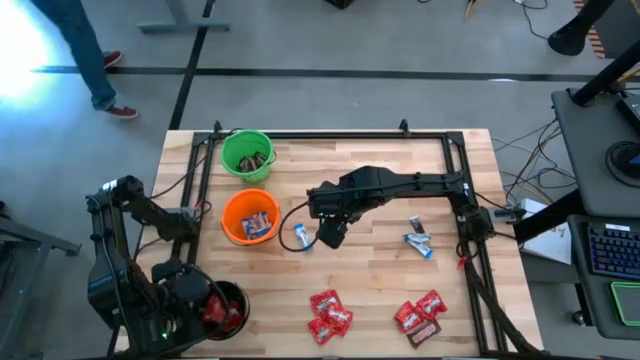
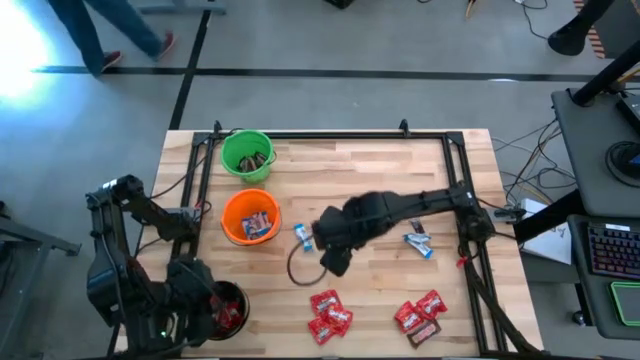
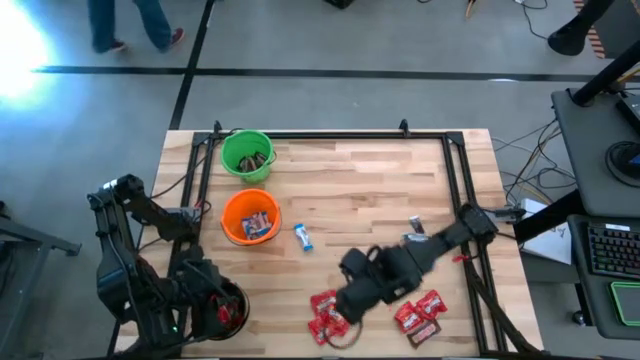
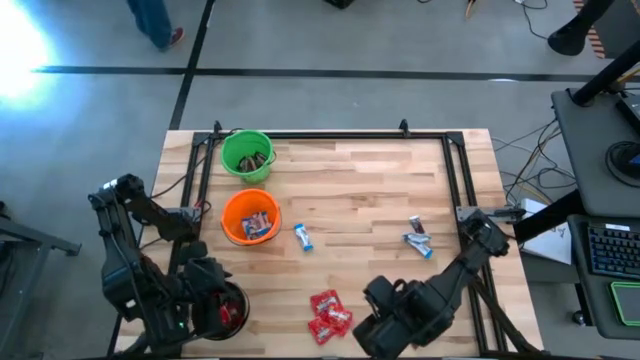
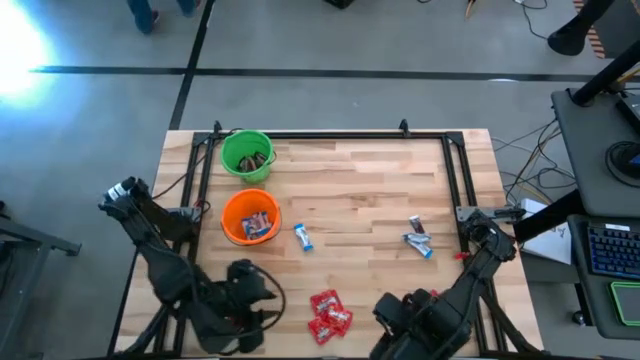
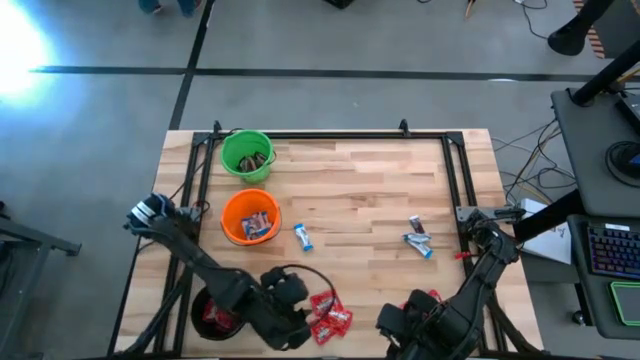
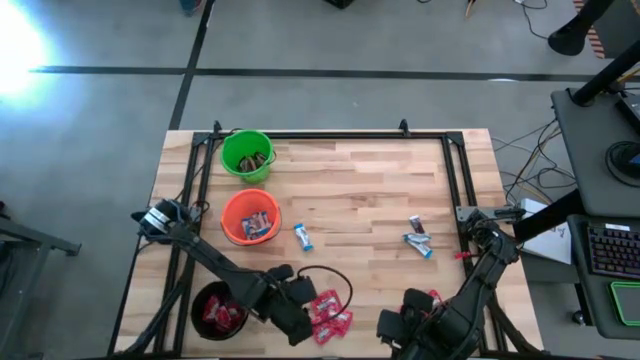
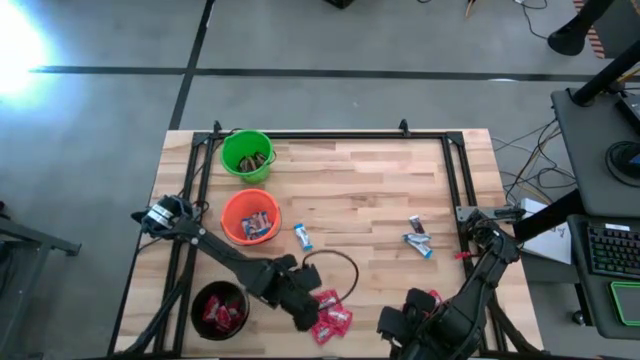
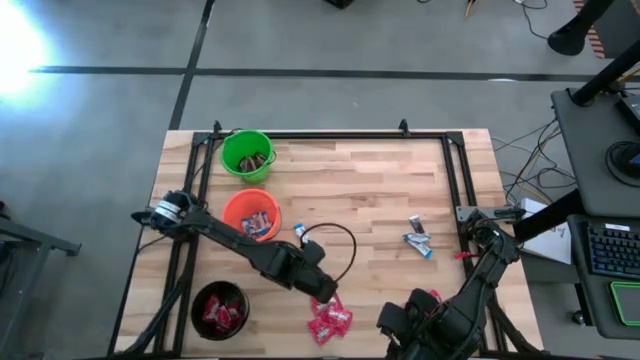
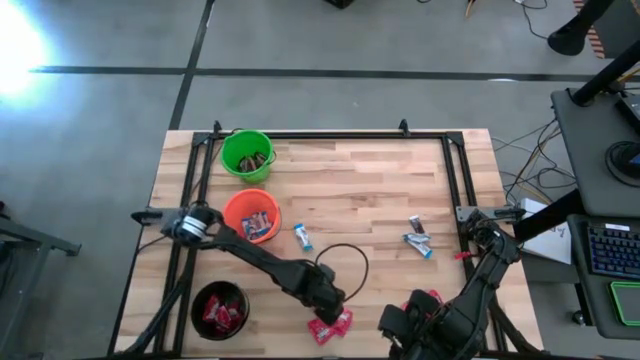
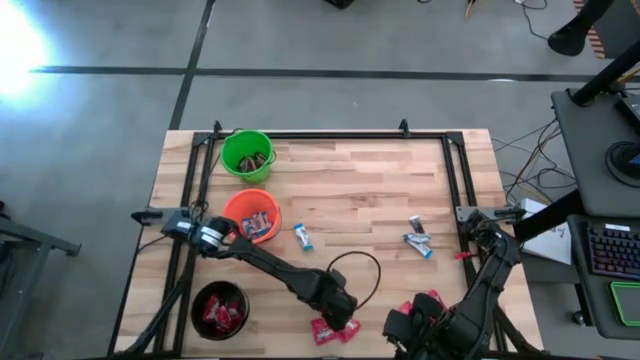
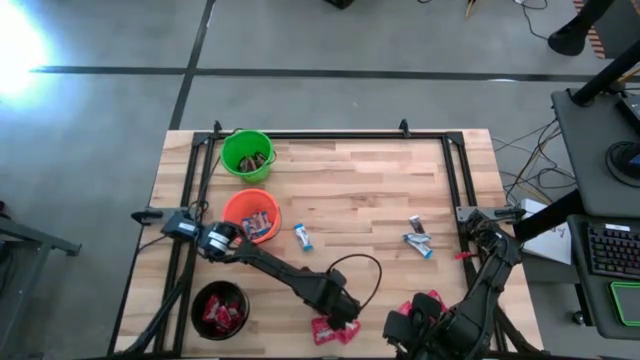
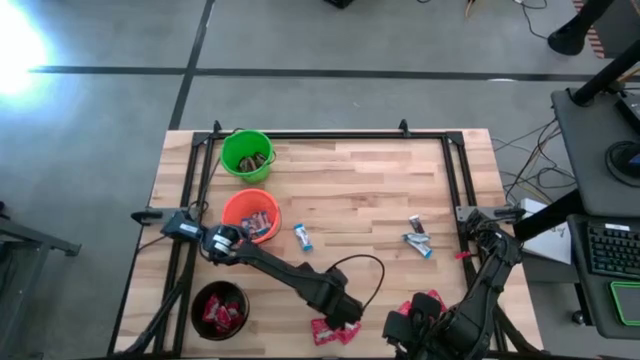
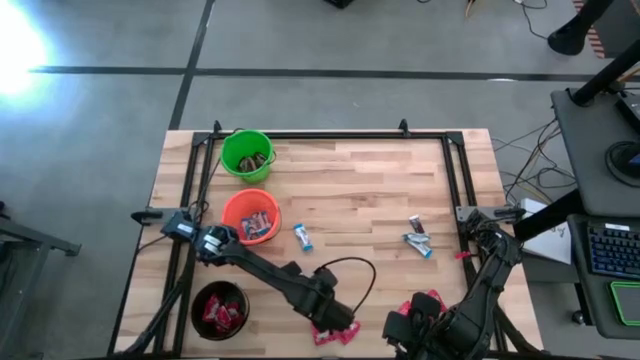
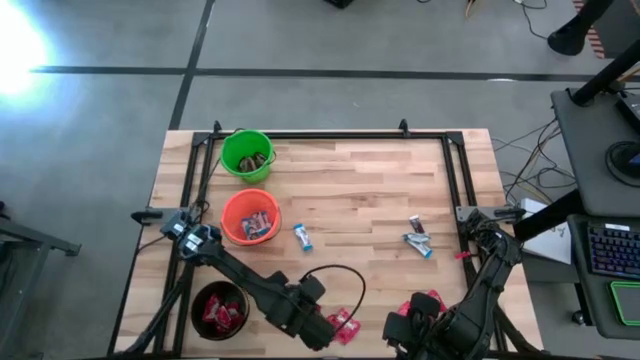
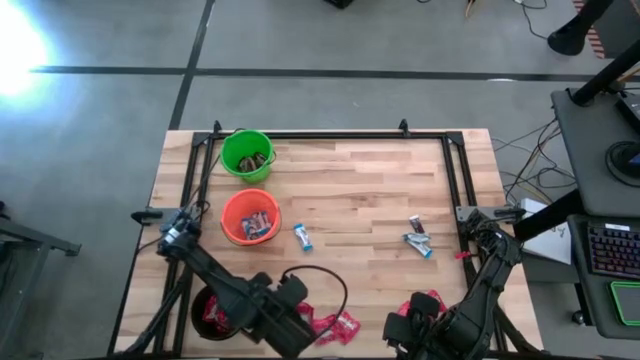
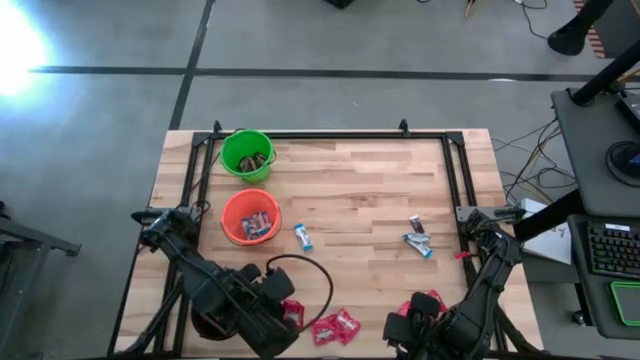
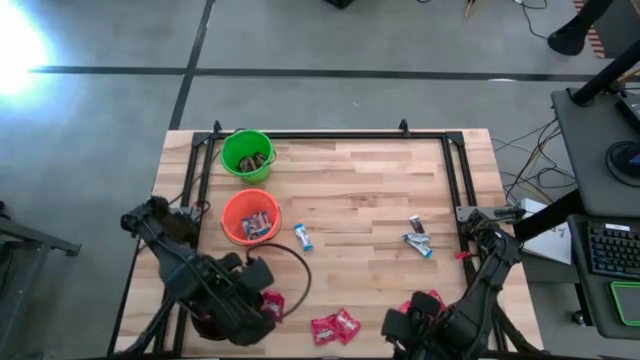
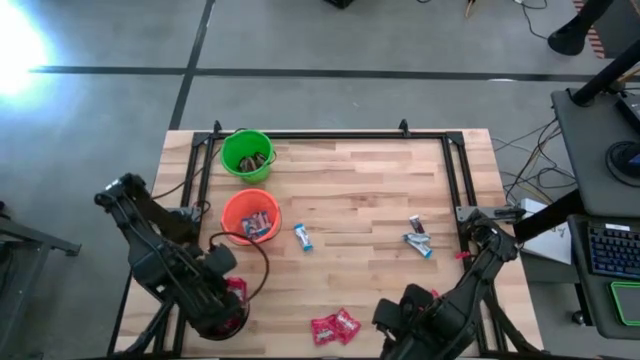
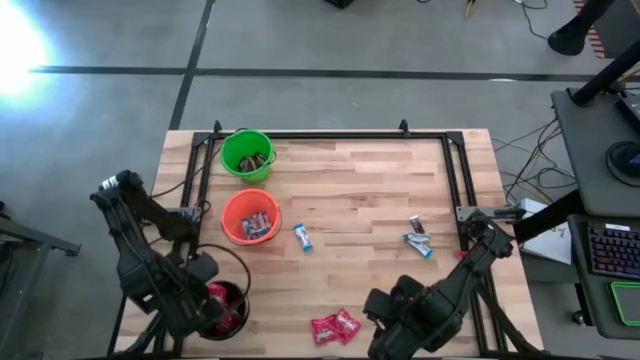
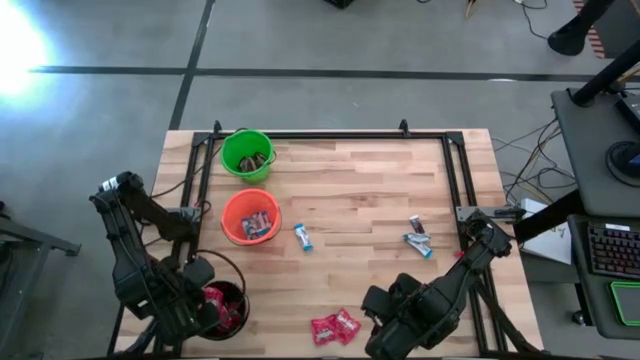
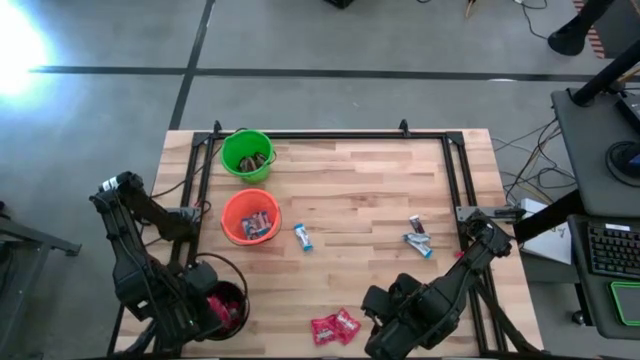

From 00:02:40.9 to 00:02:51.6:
Task: Organize candy in baskets
Put the red candy into the black bucket

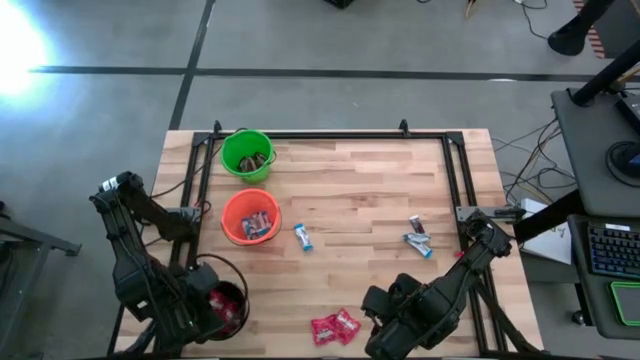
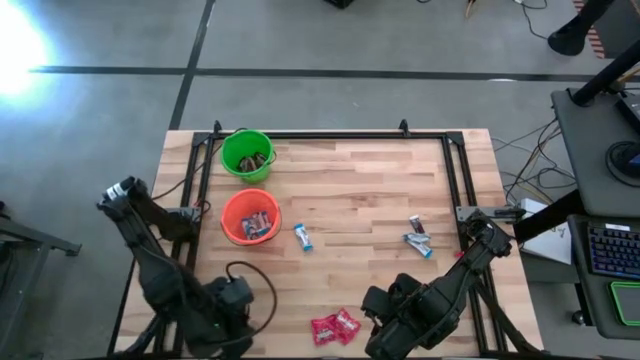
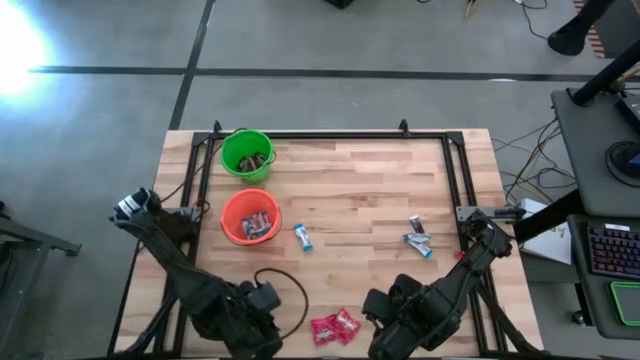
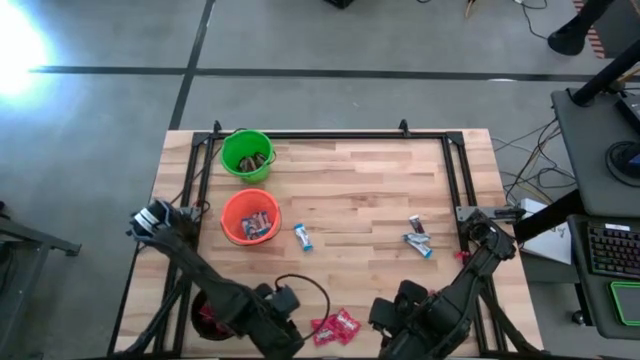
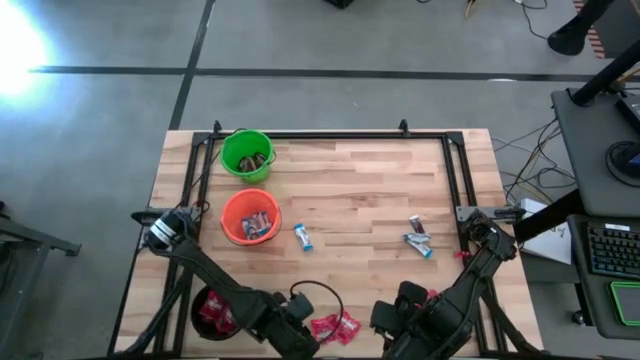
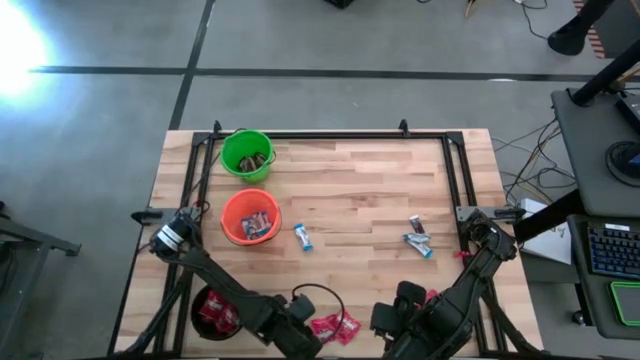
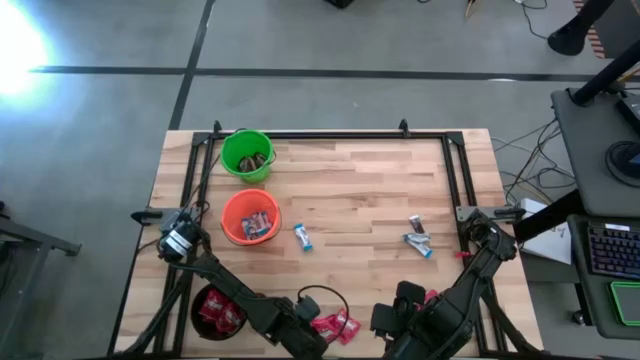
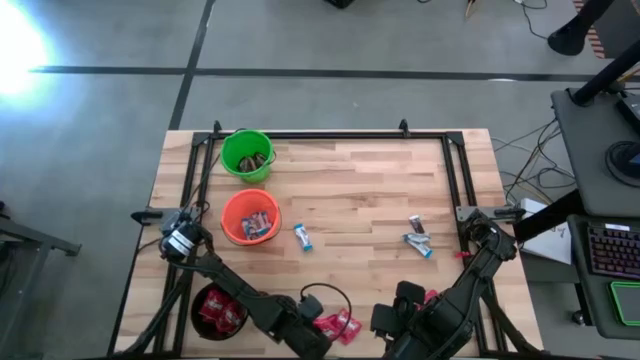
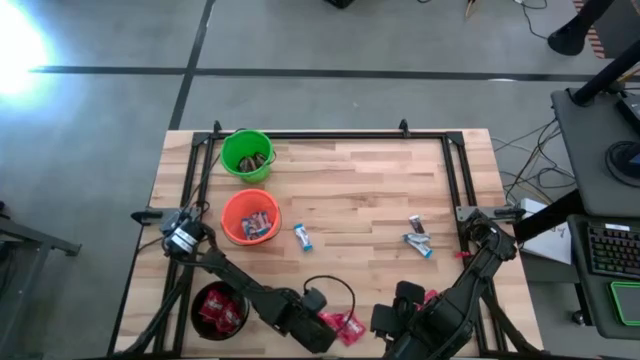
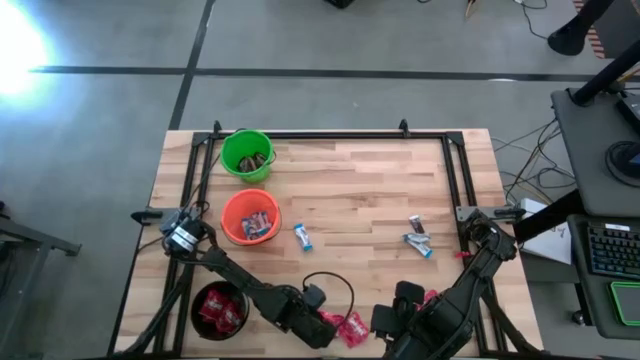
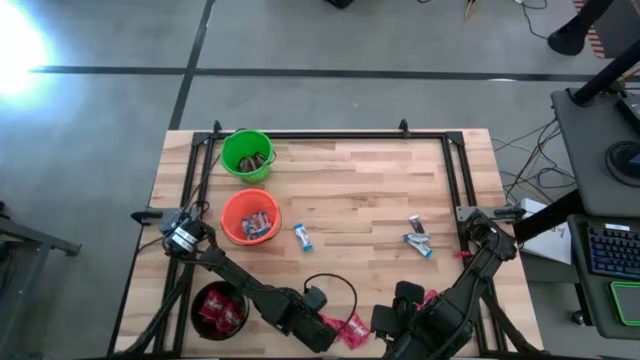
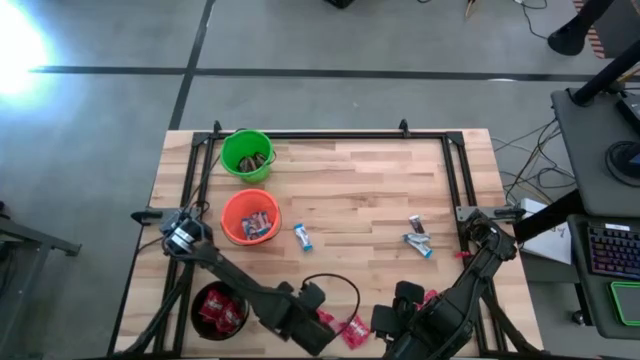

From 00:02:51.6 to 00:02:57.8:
Put the red candy into the black bucket

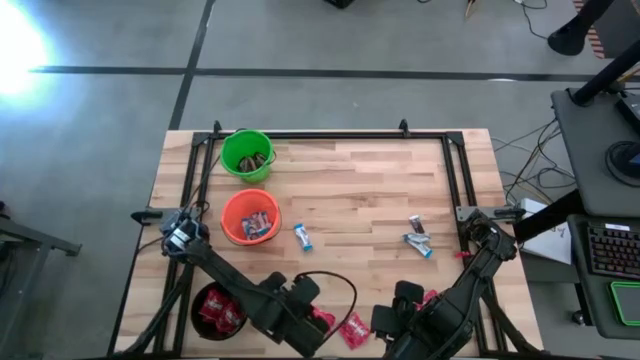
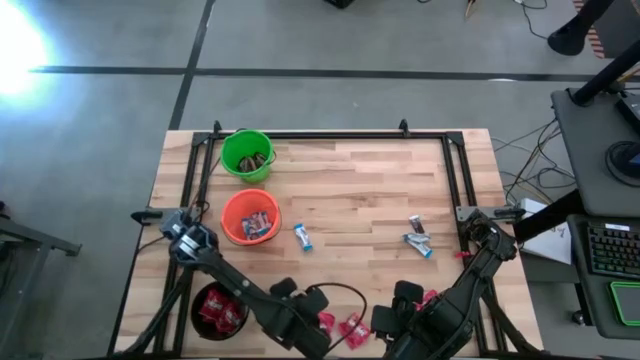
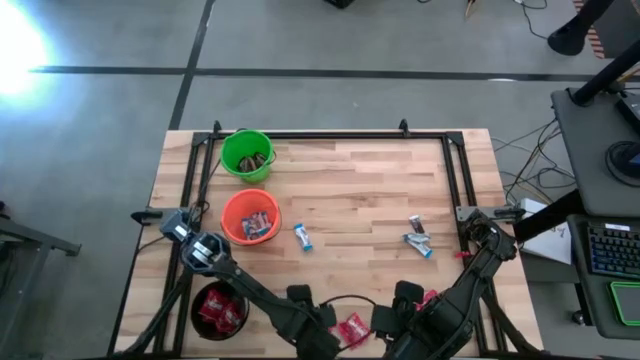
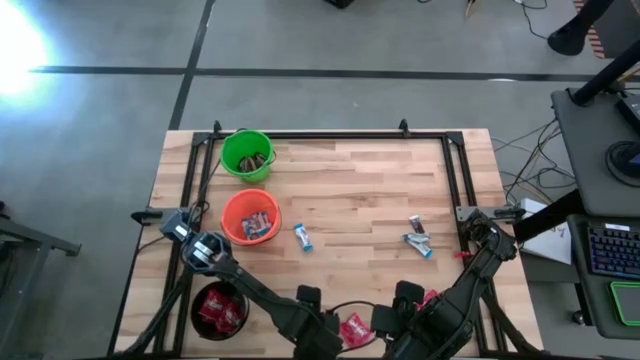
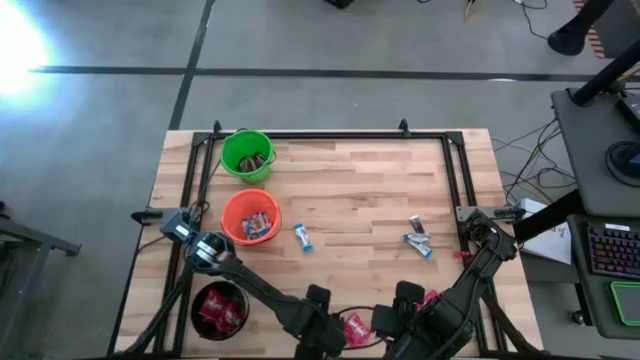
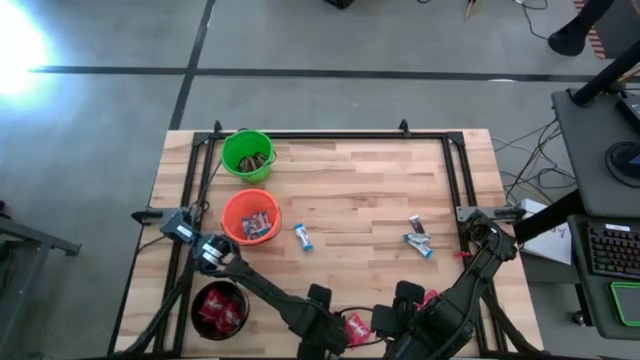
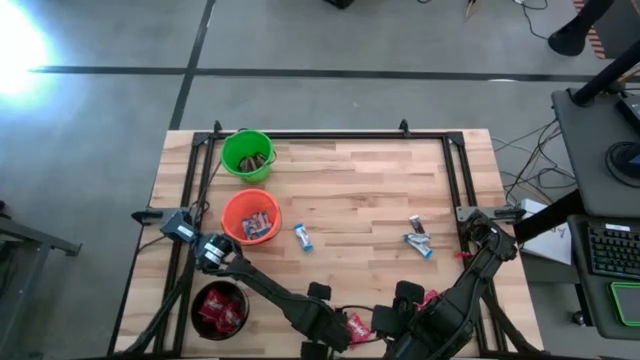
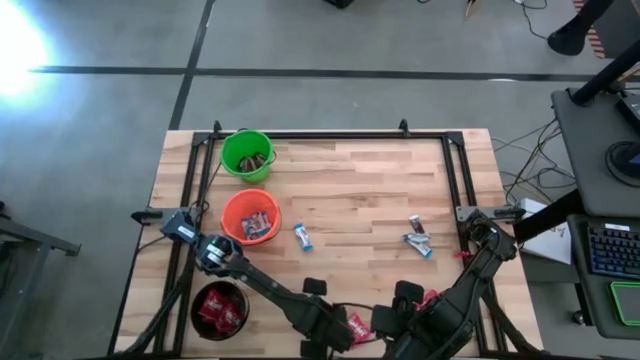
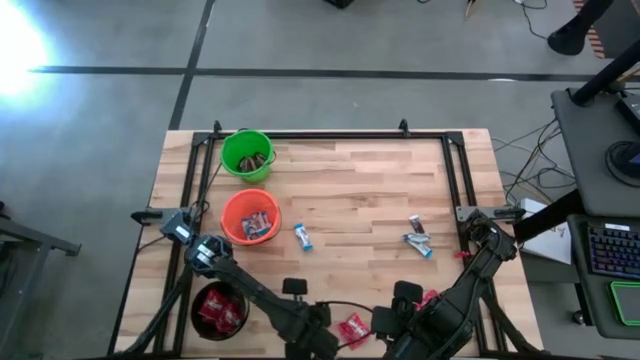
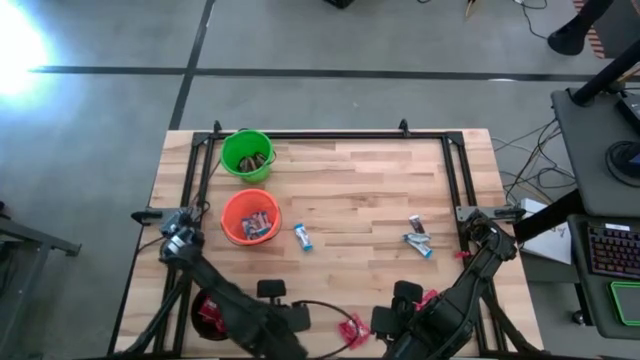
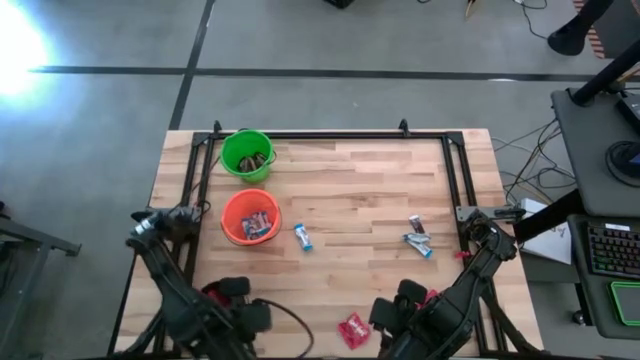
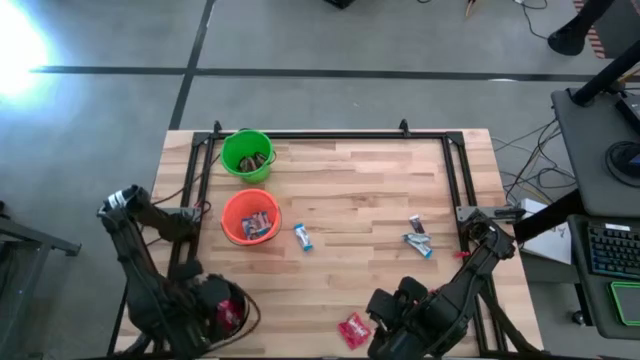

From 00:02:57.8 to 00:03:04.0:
Put the red candy into the black bucket
